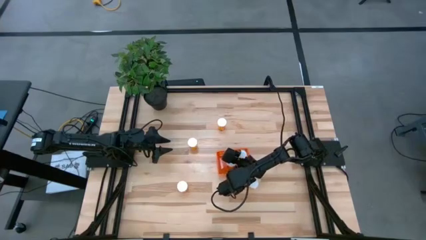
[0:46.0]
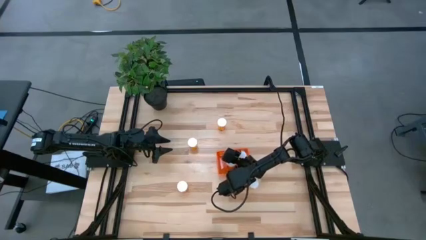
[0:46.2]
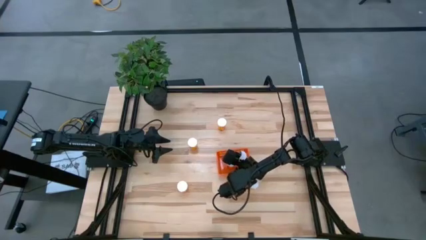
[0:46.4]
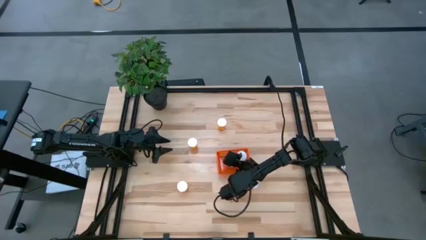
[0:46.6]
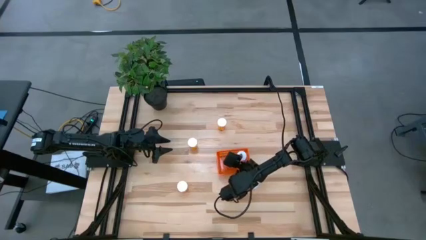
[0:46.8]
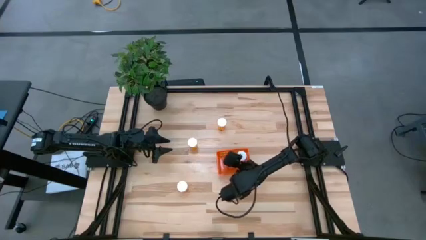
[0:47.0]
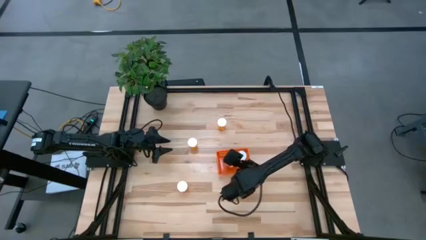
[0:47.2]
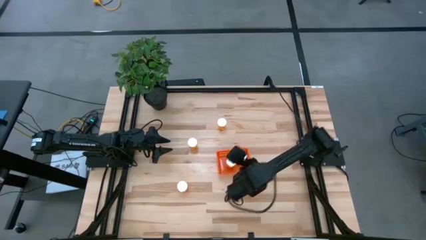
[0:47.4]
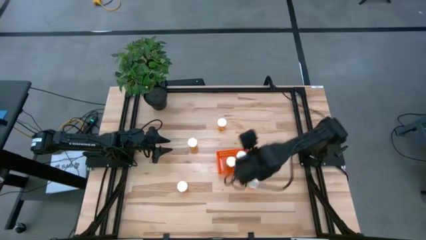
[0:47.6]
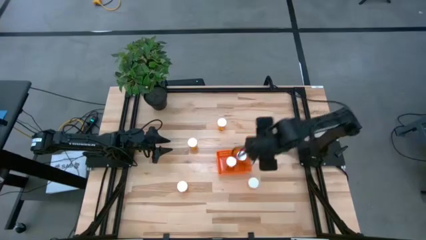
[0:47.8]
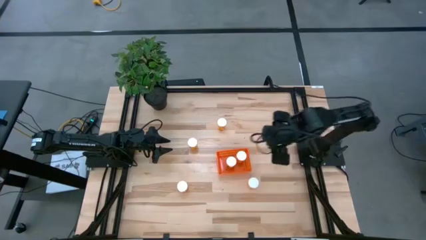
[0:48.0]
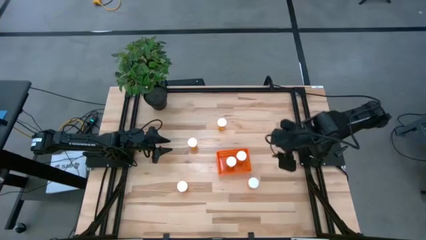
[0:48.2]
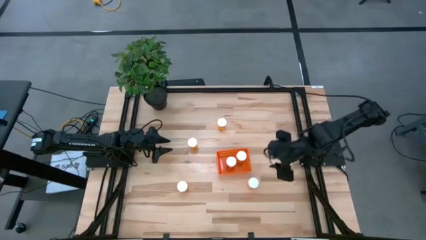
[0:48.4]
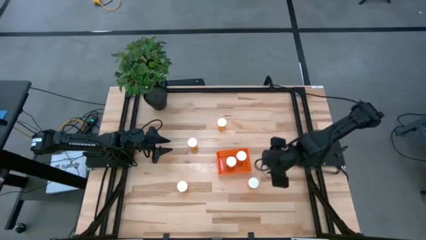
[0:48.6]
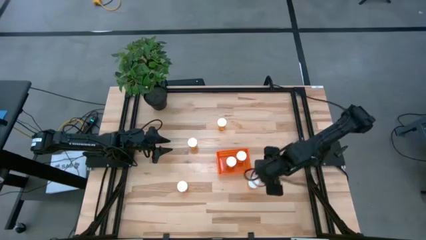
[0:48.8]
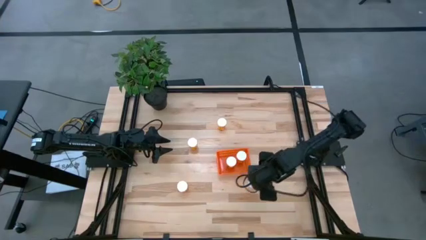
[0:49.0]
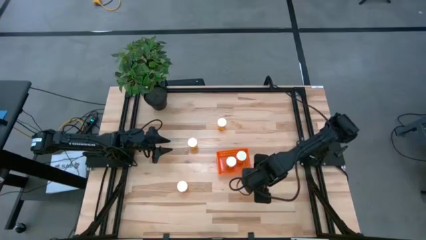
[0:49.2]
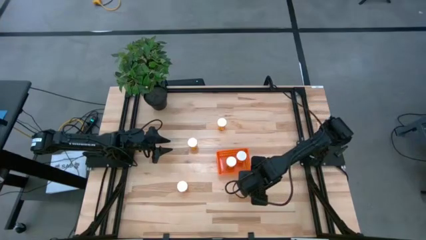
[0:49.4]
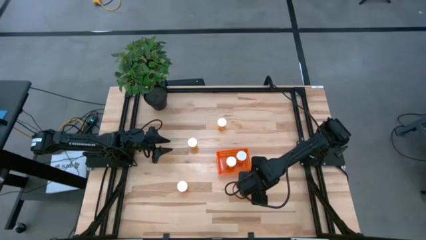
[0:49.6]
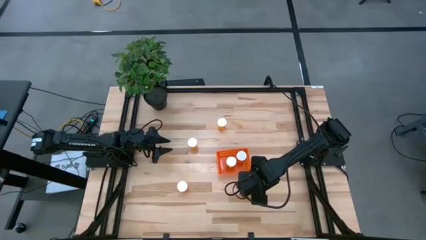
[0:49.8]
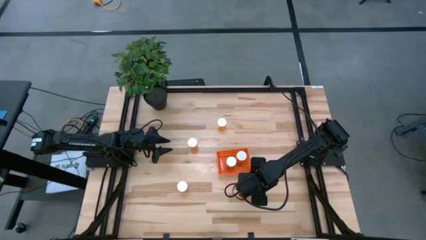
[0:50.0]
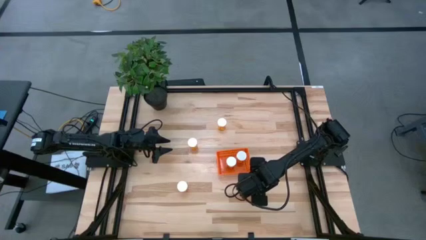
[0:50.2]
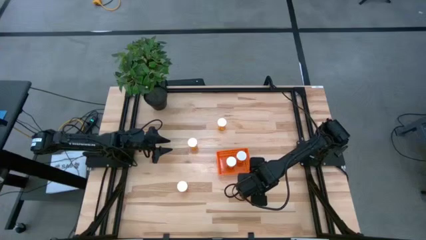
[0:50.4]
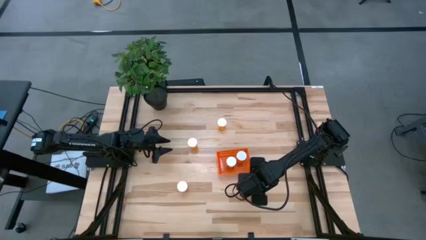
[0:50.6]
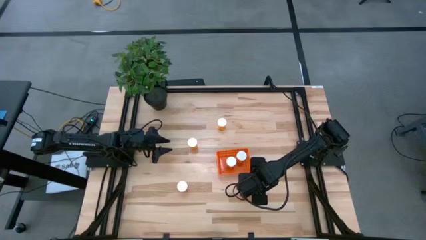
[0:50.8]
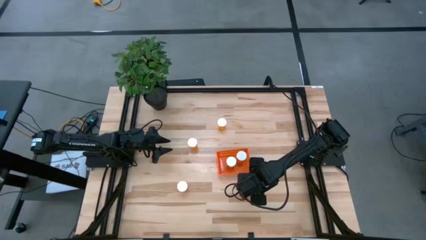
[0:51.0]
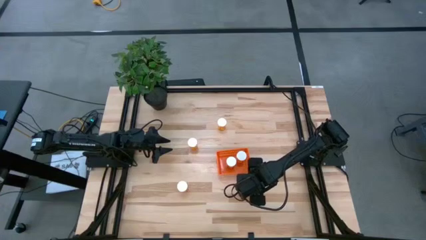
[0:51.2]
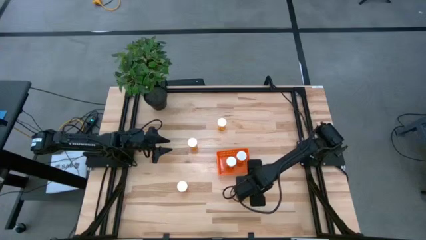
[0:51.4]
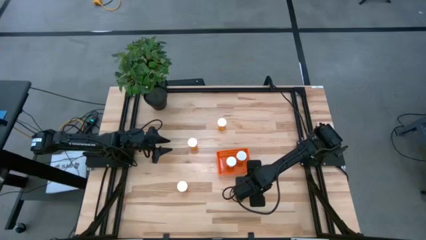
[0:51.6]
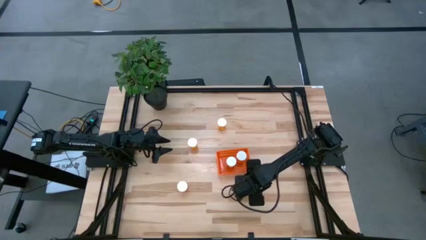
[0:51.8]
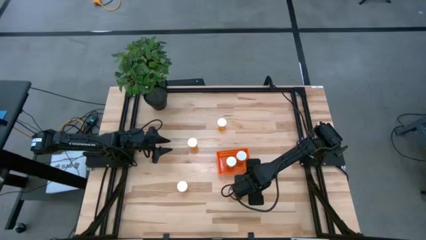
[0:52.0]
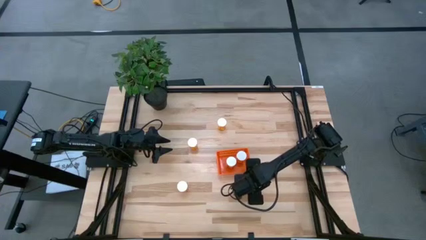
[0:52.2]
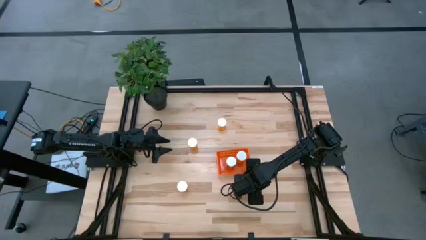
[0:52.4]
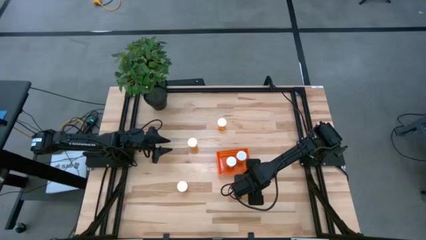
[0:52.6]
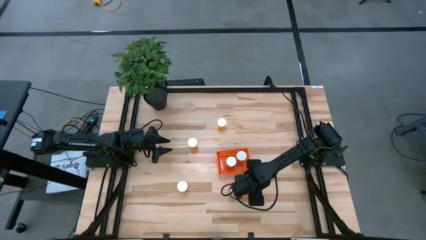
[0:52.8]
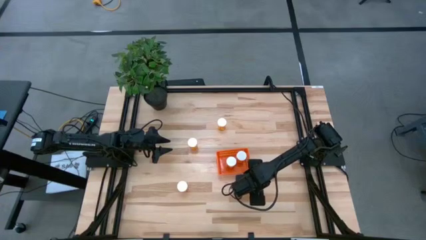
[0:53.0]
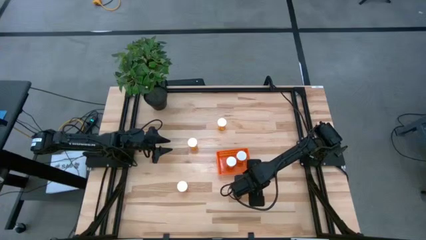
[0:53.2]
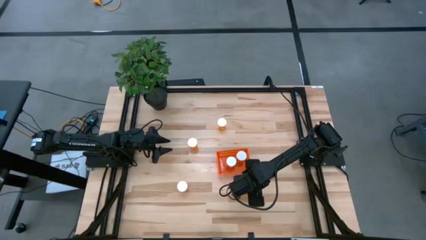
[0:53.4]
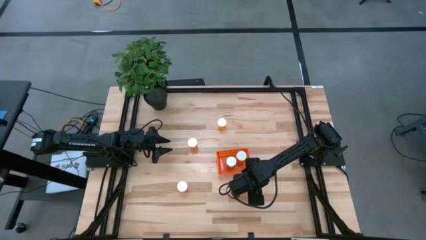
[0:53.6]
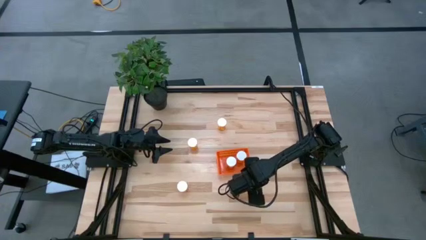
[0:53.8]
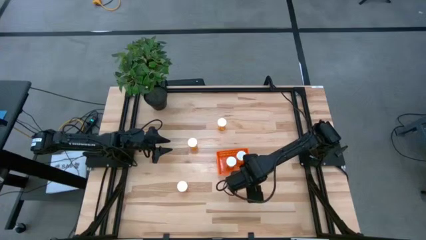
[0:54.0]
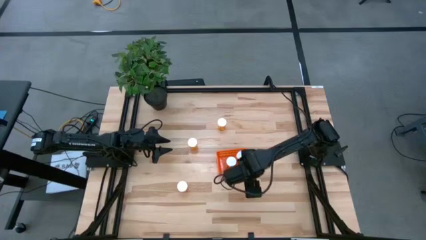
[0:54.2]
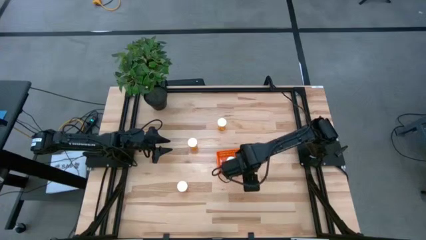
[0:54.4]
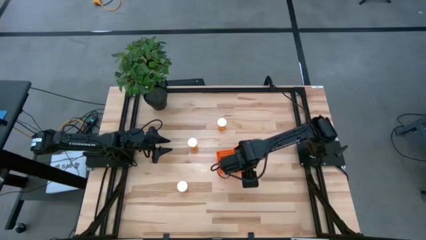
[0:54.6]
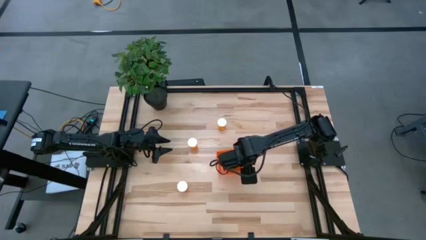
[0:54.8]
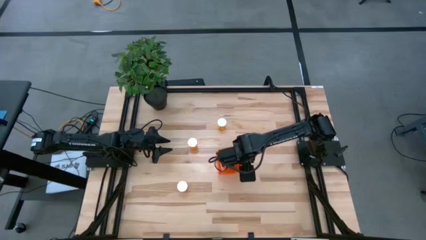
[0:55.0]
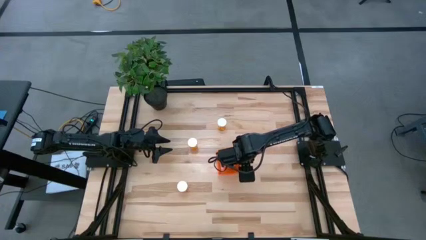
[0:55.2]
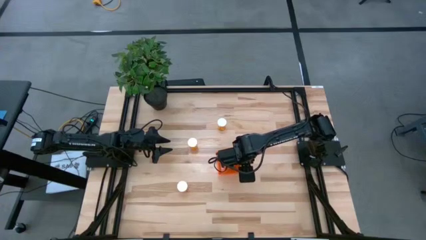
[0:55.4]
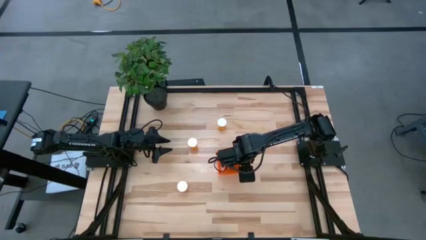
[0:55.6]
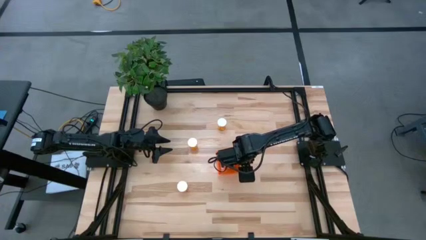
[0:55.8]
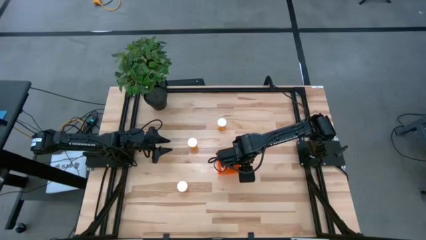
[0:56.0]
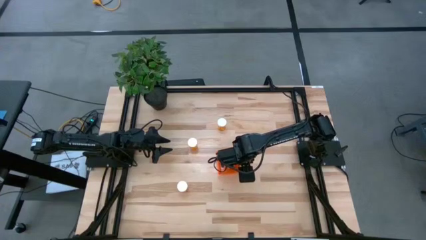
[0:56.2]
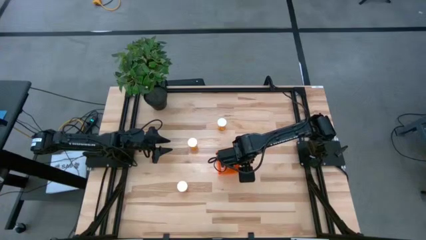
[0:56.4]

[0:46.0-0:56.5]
Task: Pick and place pill bottles into a basket
Put the orange pill bottle into the orange bin

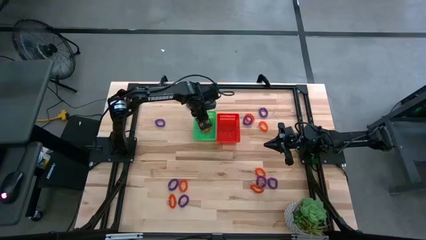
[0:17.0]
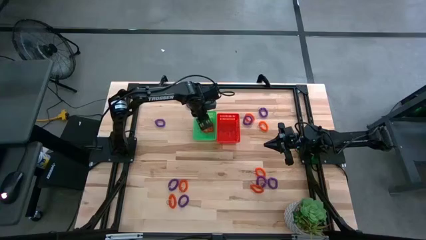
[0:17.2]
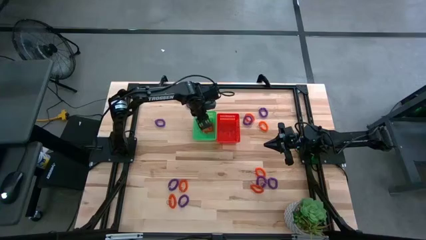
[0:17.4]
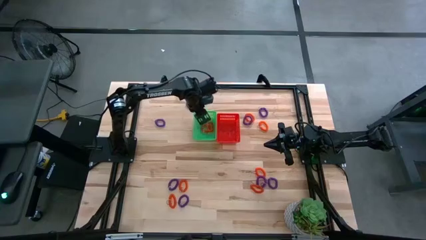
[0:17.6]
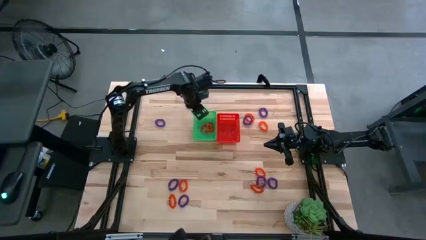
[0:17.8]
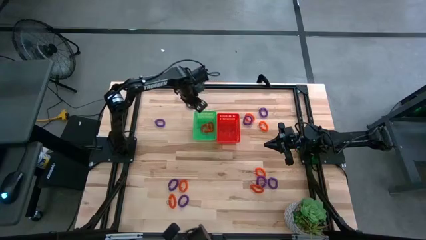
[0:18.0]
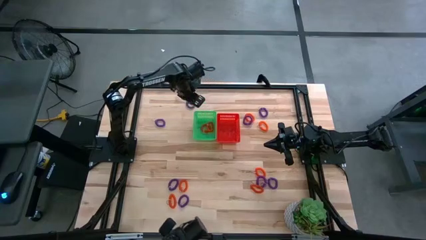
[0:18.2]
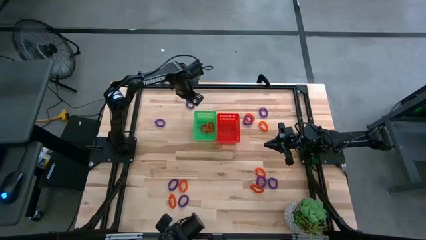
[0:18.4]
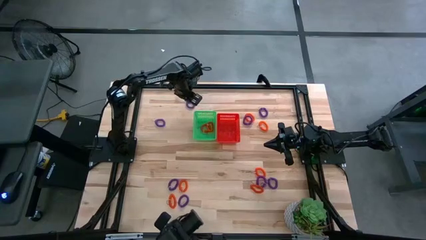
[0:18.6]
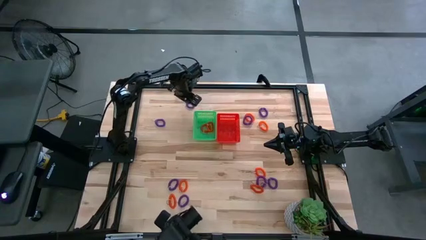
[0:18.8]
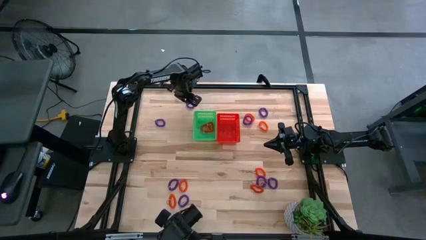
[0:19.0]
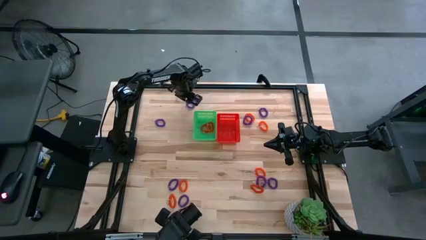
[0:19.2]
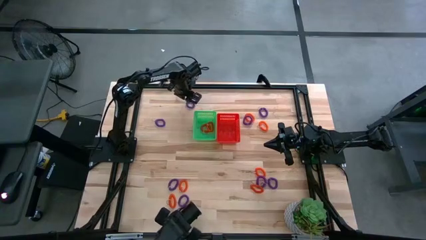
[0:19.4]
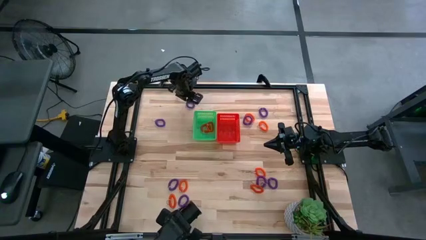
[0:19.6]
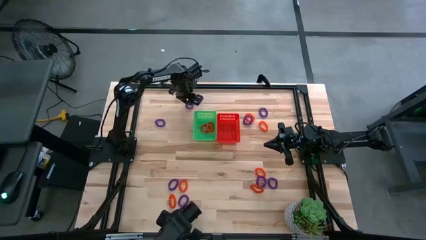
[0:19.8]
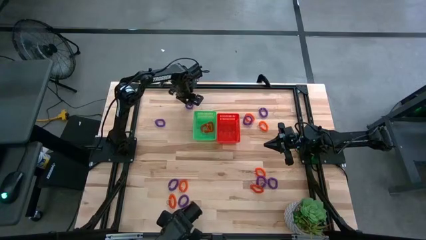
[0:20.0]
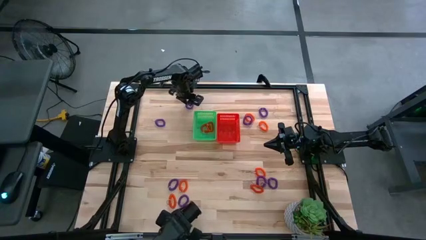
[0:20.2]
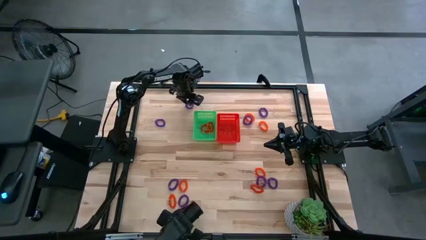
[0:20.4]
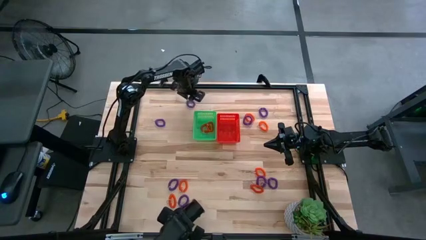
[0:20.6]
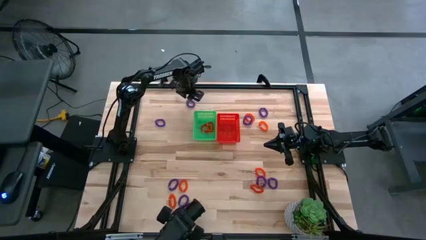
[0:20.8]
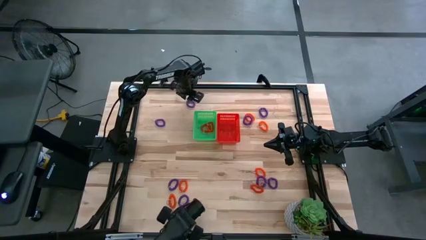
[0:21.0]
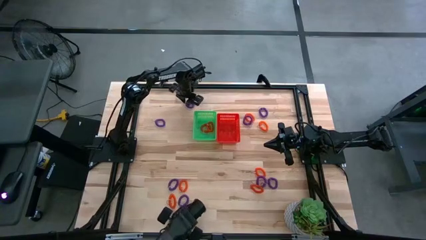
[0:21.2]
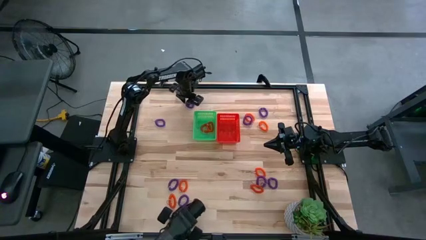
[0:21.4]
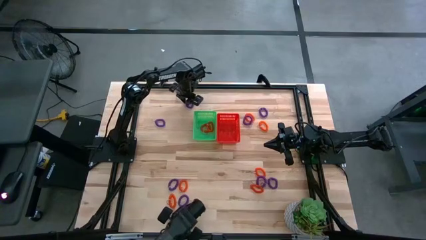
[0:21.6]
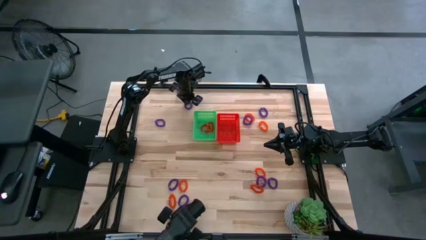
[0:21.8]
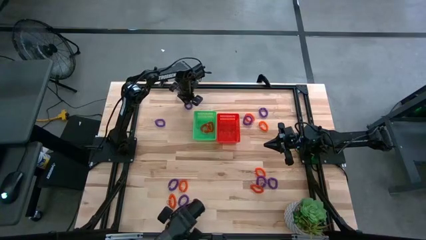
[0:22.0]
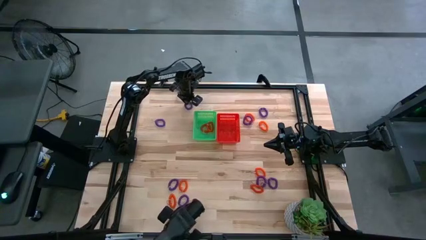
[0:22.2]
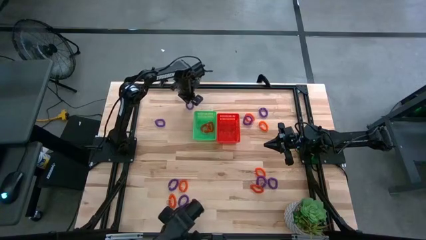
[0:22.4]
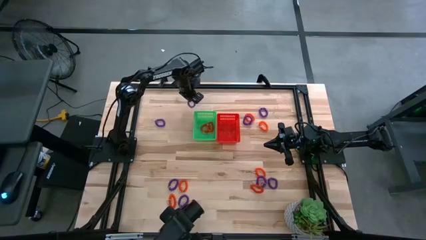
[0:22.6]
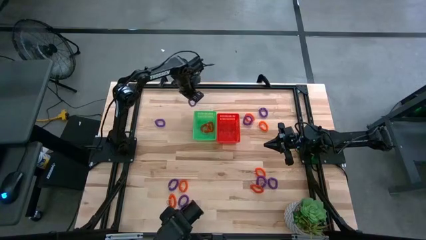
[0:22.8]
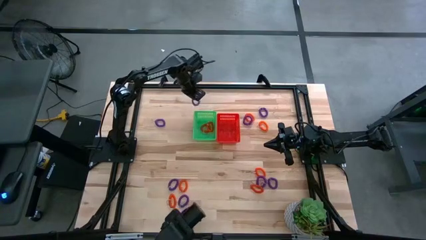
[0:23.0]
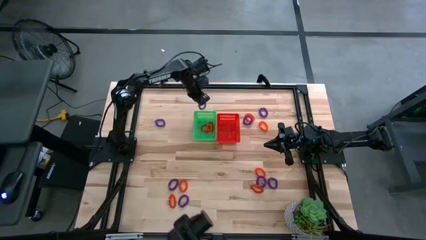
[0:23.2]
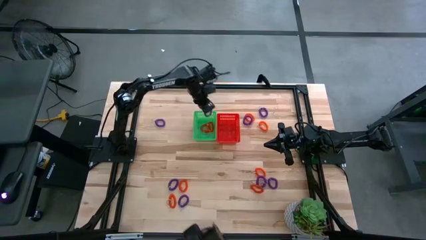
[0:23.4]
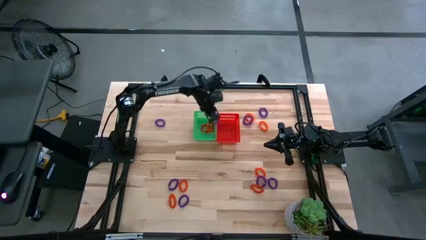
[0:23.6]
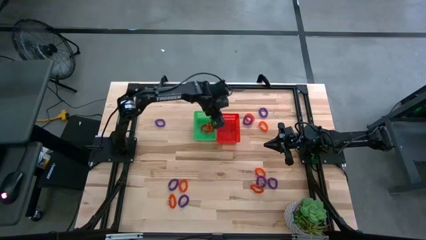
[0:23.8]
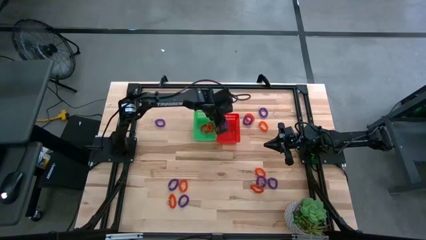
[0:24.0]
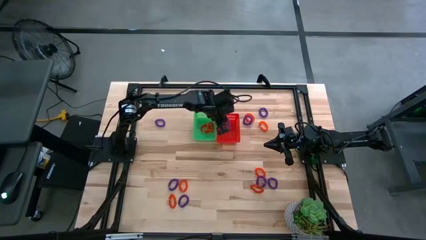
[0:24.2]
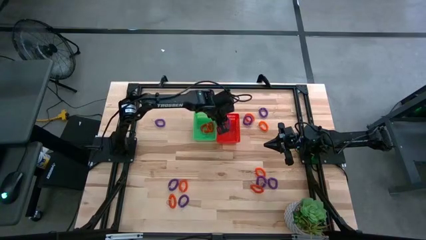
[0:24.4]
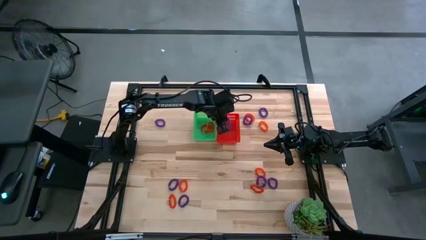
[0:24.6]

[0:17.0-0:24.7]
Task: Sort spring keychains
Put the purple spring keychain into the orange bin
